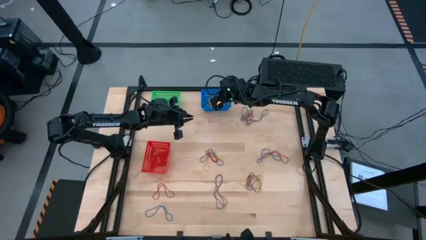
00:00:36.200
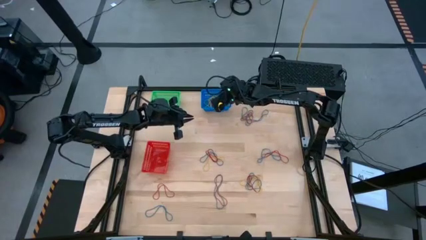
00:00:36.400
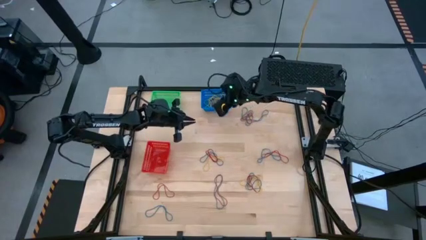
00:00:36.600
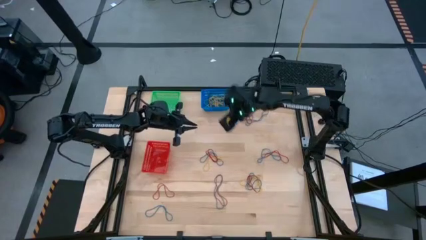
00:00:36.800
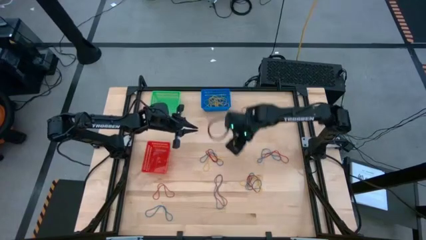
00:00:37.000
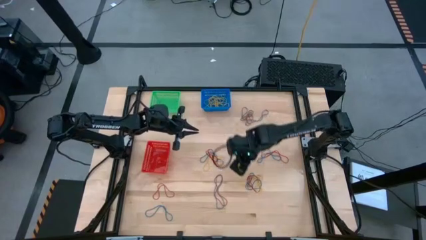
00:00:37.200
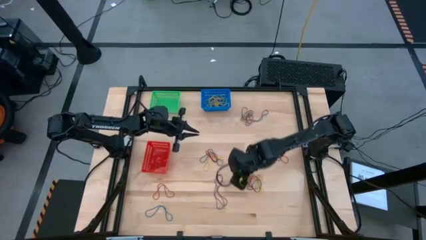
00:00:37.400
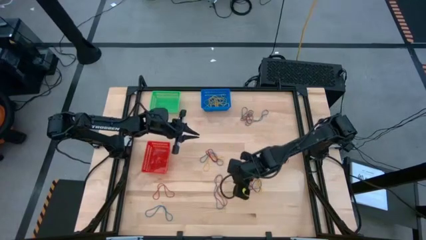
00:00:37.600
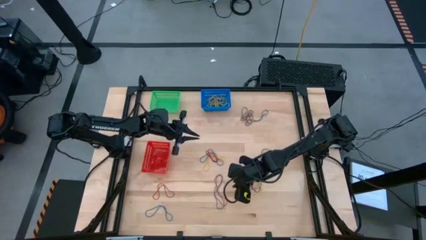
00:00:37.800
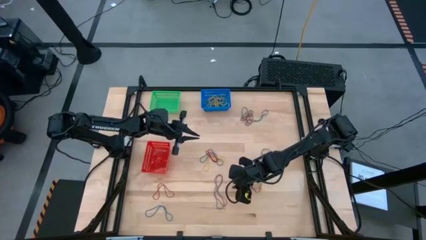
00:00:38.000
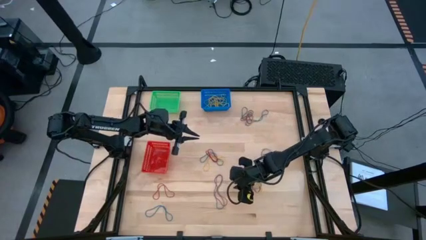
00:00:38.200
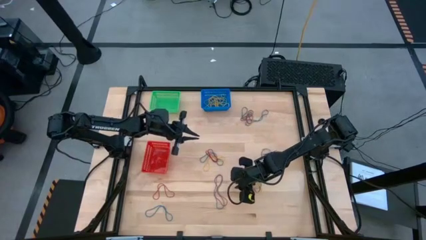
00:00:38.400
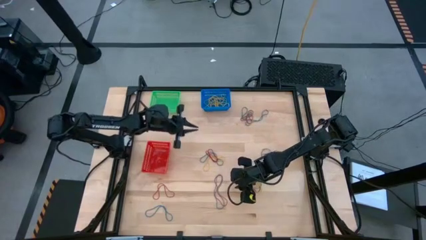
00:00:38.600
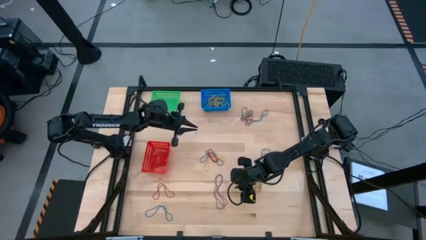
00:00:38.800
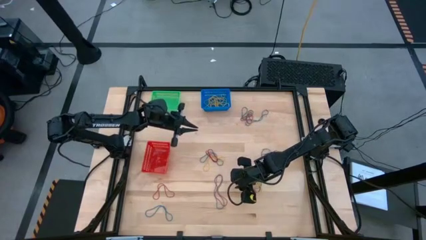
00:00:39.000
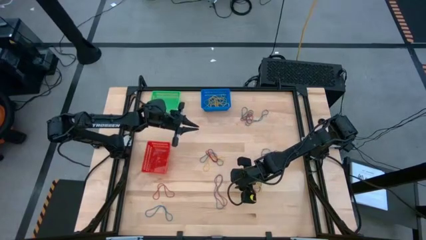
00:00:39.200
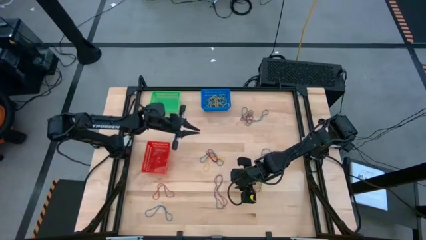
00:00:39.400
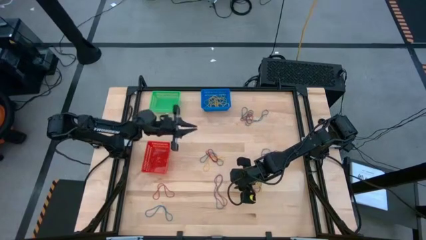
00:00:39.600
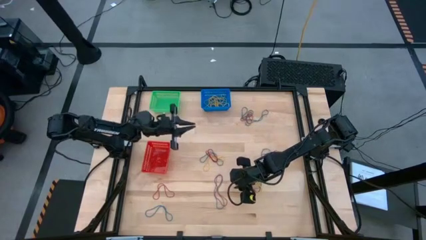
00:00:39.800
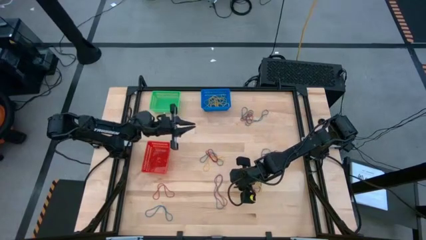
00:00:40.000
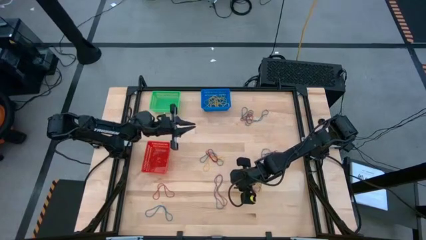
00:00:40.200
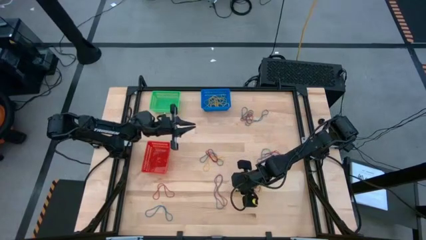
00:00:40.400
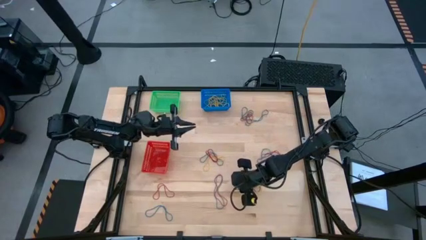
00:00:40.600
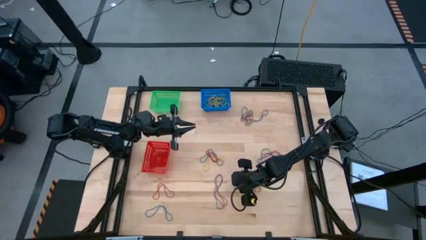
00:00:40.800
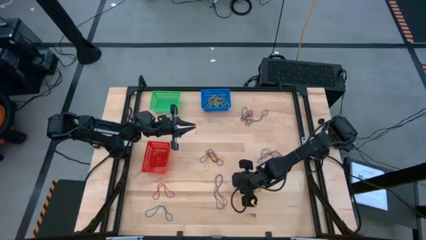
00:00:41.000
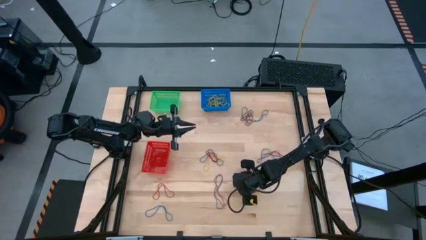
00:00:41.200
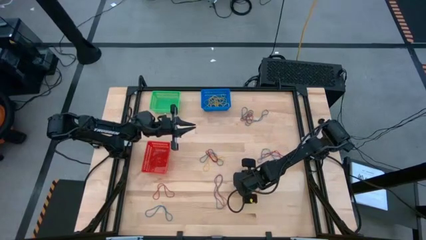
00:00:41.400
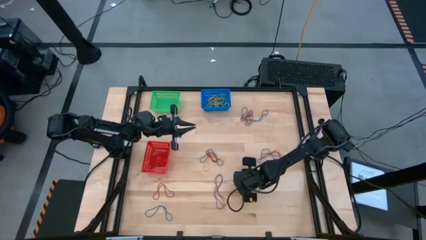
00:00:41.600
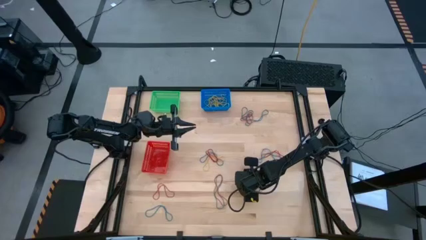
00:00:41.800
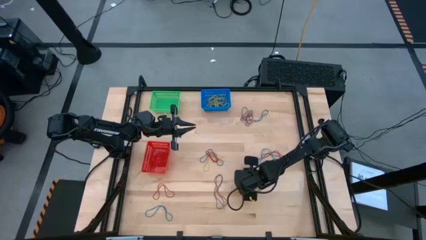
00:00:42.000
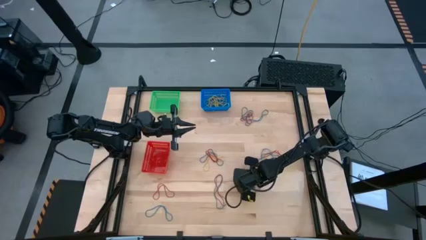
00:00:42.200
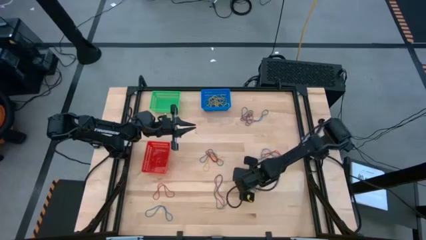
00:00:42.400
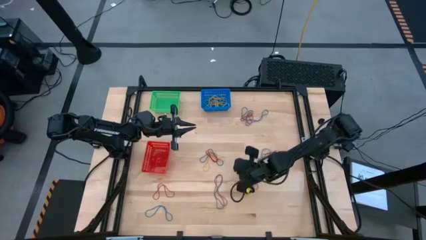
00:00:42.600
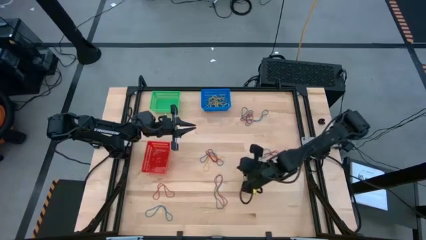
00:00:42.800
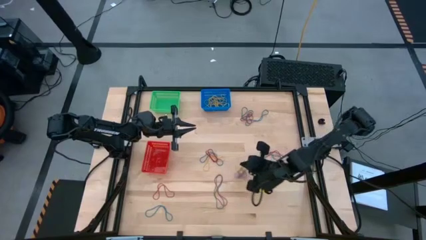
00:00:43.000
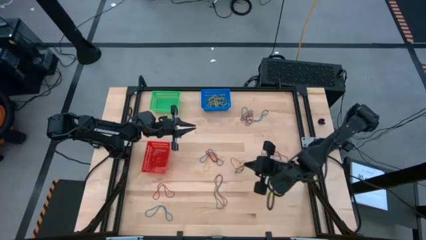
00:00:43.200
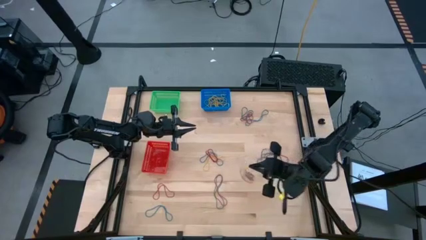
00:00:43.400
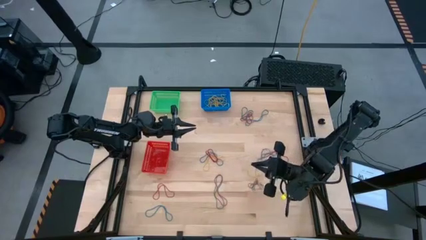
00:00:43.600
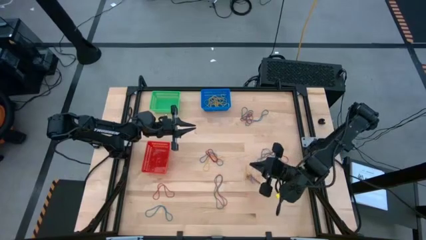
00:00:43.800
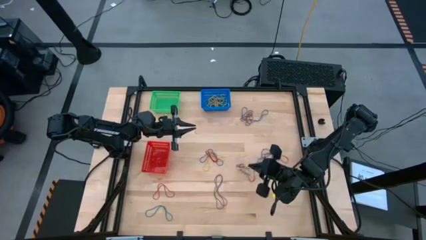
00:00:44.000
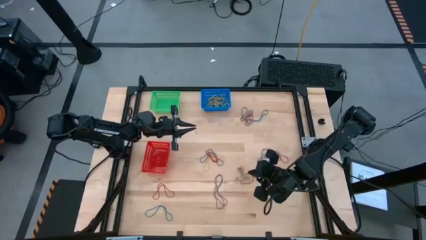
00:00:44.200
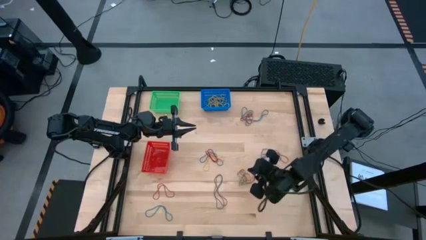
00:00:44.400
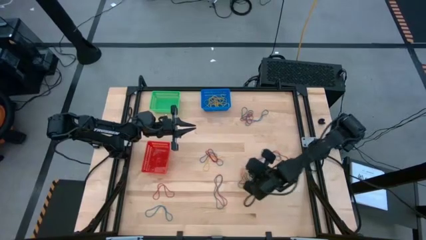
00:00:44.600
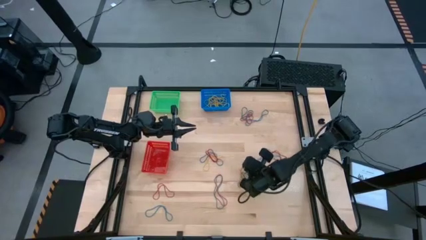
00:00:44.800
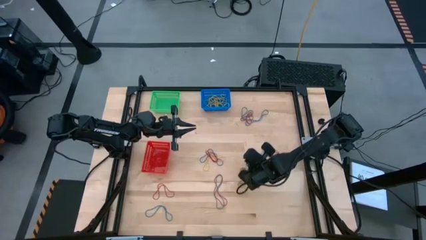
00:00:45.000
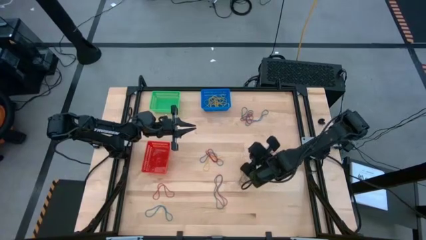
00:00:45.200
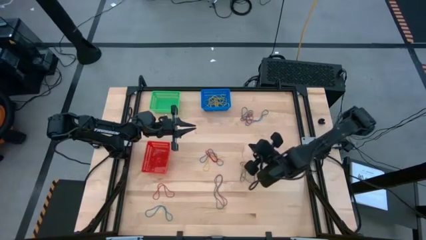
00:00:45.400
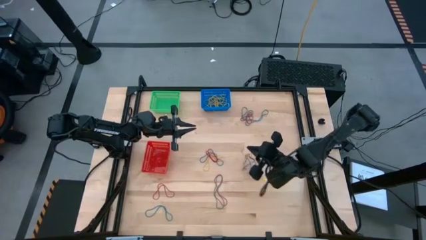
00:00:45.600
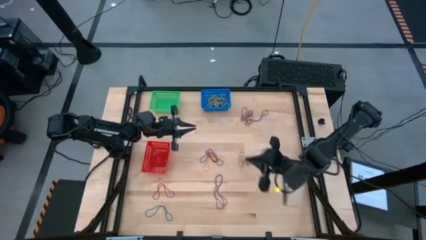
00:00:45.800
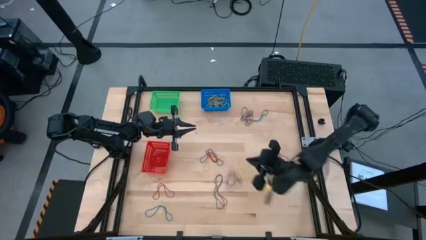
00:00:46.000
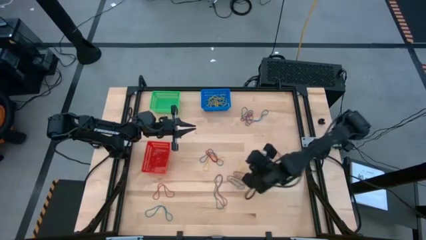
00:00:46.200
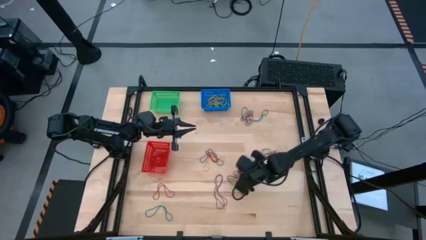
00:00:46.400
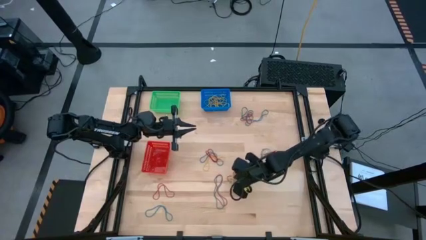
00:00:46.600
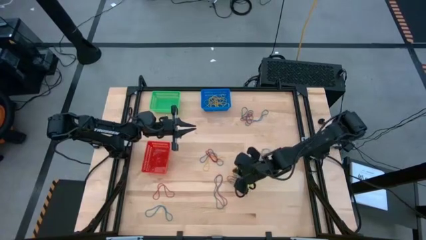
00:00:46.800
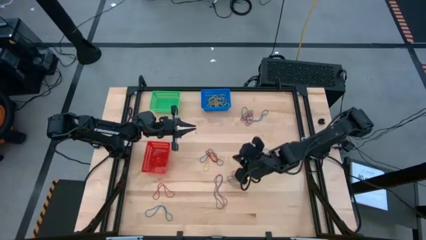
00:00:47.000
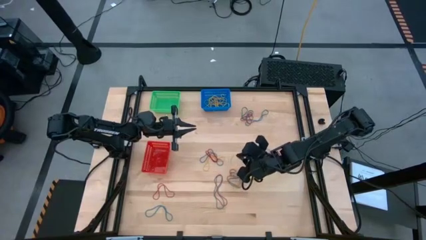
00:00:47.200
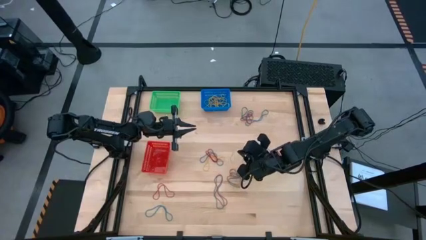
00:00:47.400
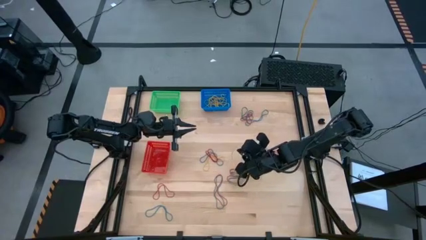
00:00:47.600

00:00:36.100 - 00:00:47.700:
Task: Sort rubber bands into baskets
Put the yellow rubber band into the blue bin
